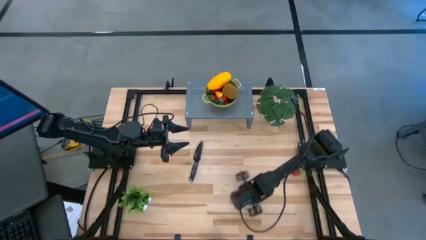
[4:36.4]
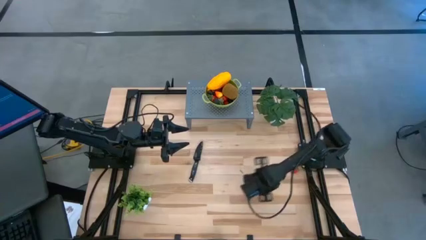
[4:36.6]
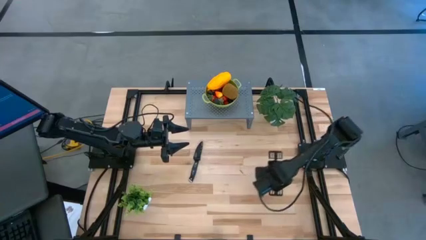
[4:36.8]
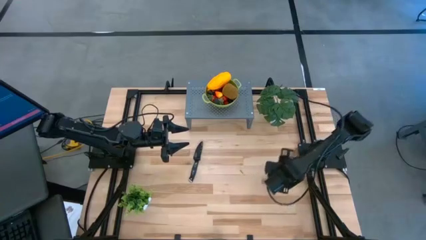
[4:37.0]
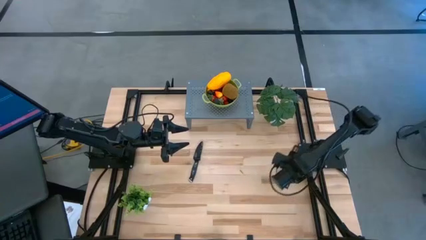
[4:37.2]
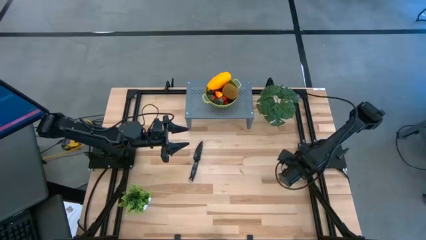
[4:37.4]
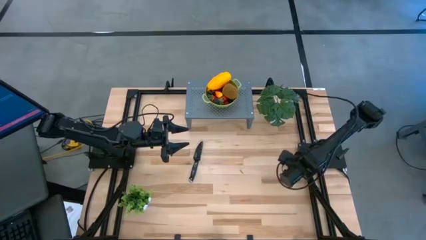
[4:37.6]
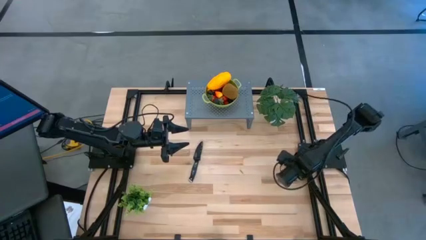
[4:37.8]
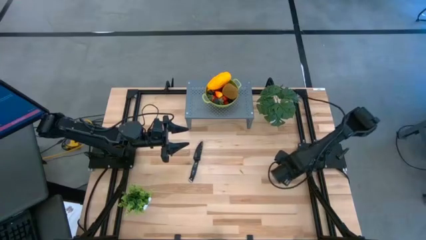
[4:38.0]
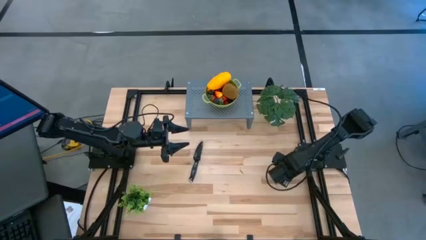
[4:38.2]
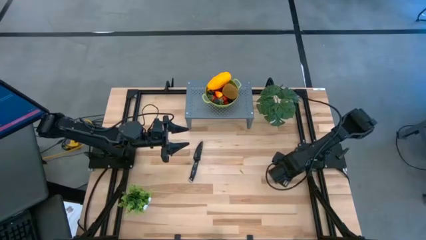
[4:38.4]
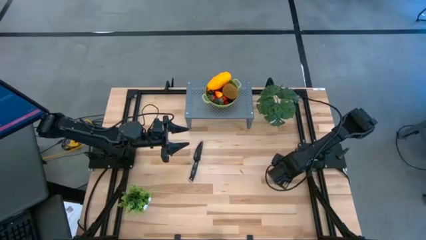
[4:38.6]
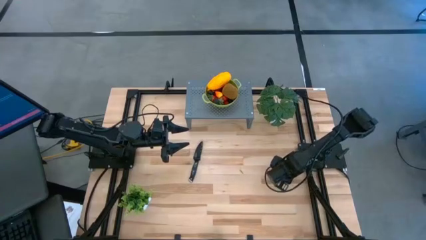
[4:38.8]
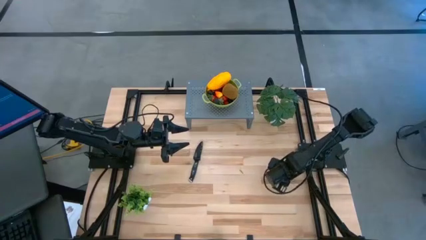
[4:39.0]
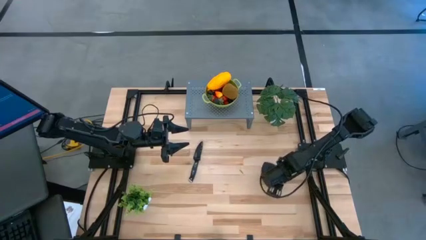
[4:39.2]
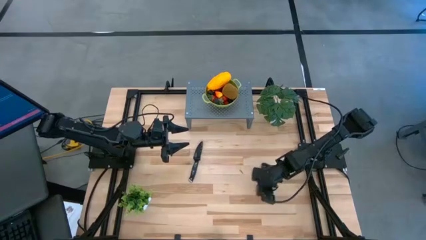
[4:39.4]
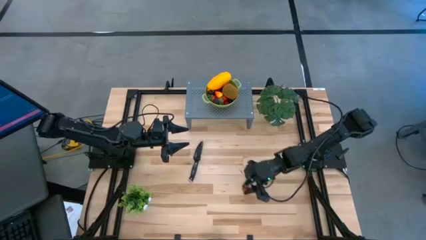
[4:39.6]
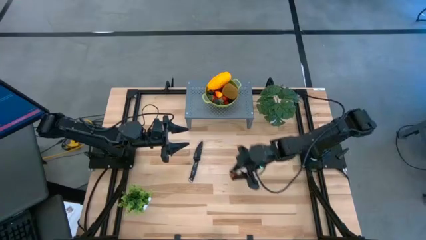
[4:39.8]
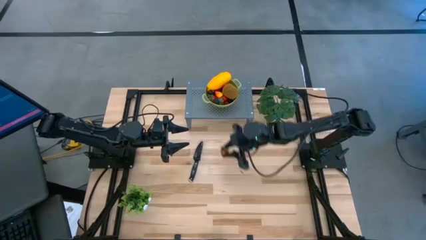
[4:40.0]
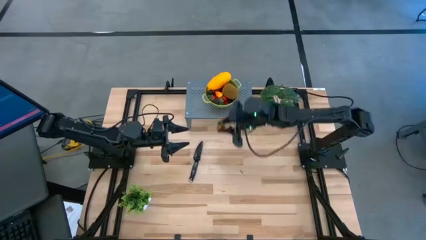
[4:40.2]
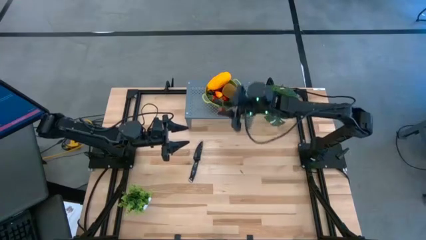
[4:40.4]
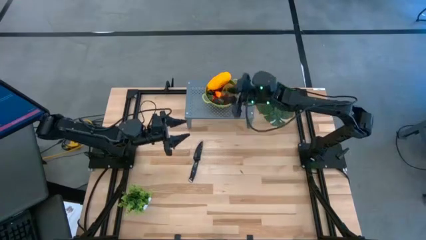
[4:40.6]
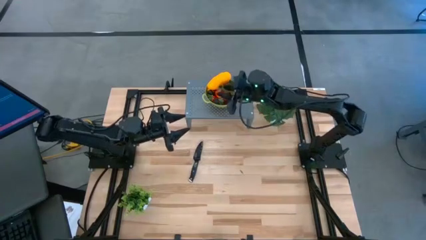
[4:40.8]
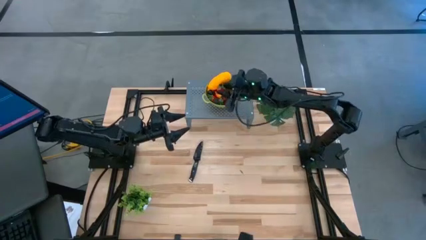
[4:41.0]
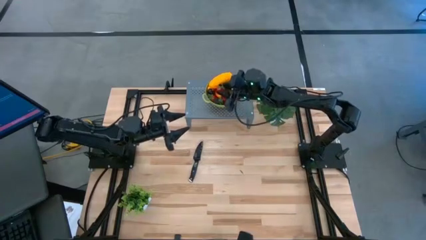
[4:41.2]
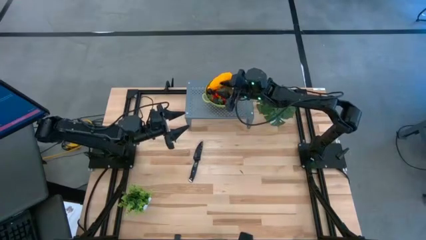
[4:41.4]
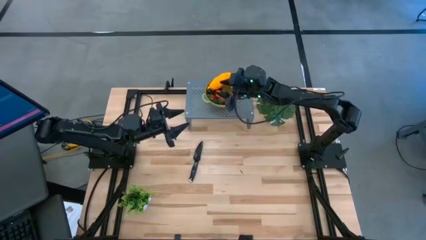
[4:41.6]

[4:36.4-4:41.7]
Task: Pick & Place Fruit
Put the strawberry into the green strainer bowl on the shelf

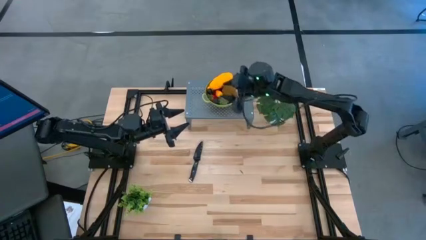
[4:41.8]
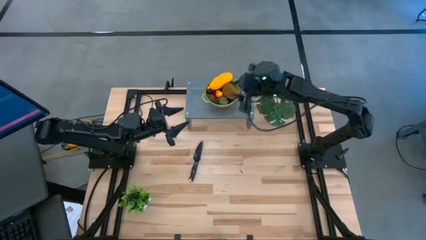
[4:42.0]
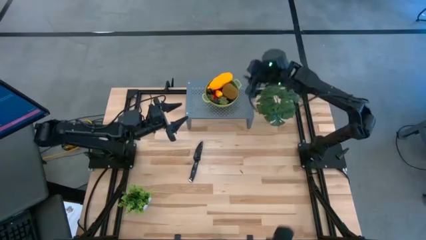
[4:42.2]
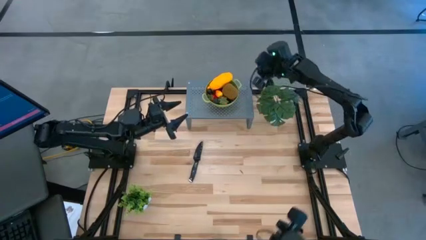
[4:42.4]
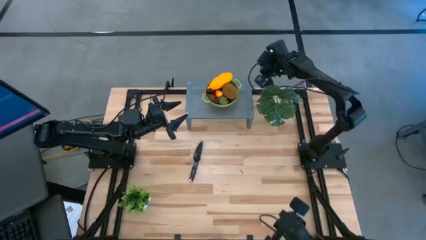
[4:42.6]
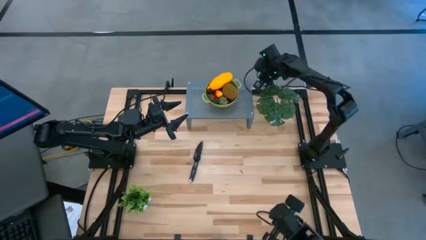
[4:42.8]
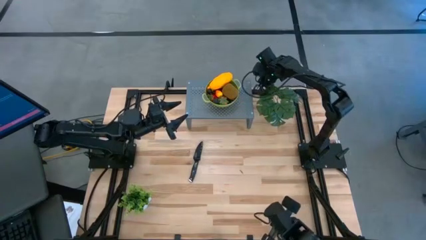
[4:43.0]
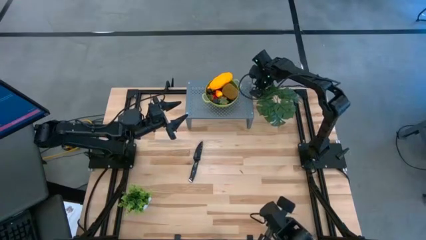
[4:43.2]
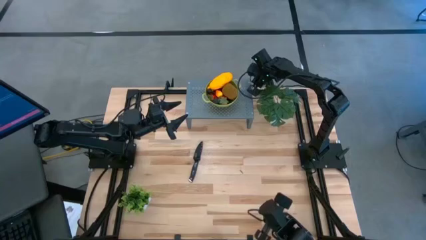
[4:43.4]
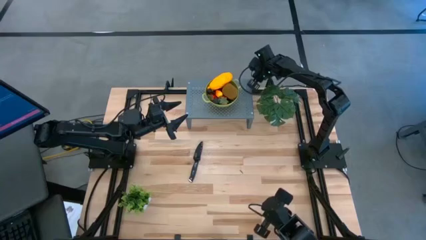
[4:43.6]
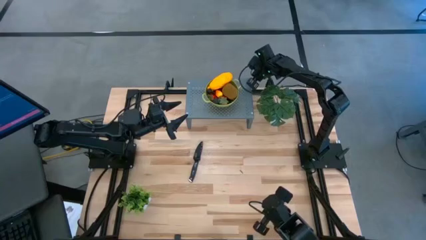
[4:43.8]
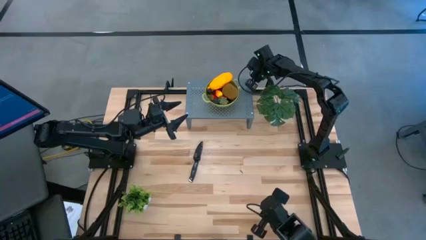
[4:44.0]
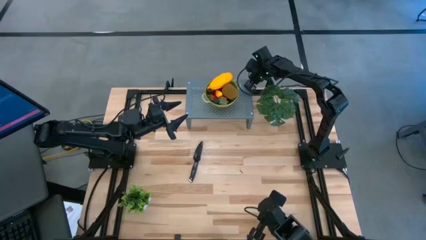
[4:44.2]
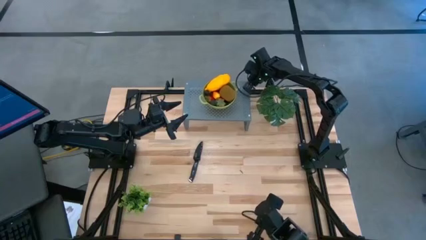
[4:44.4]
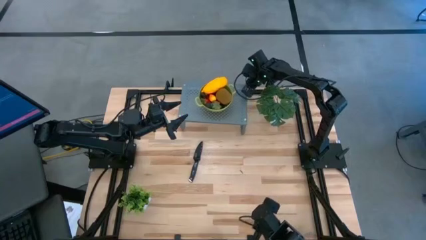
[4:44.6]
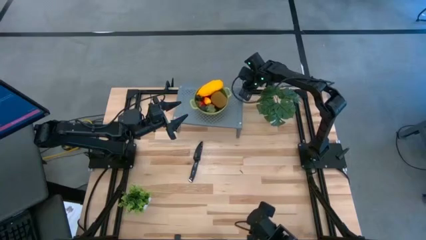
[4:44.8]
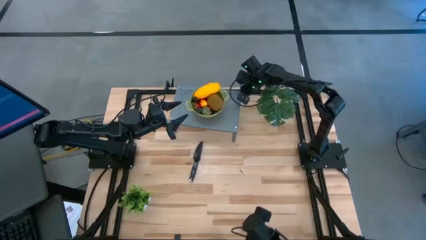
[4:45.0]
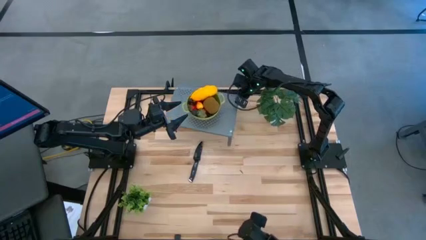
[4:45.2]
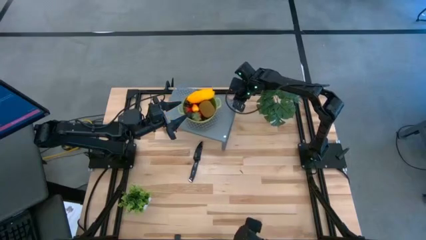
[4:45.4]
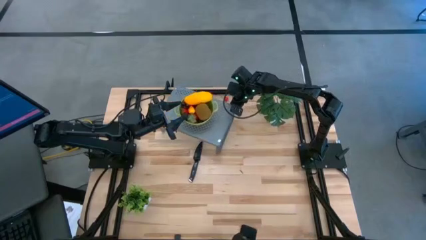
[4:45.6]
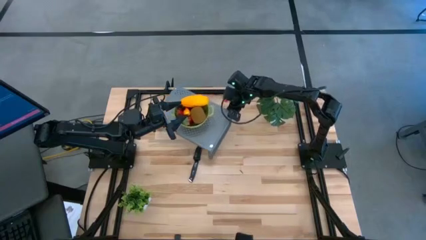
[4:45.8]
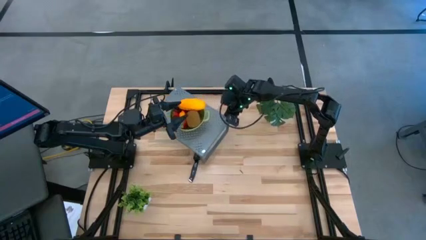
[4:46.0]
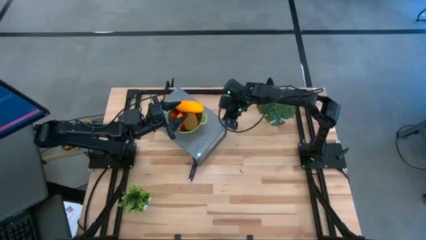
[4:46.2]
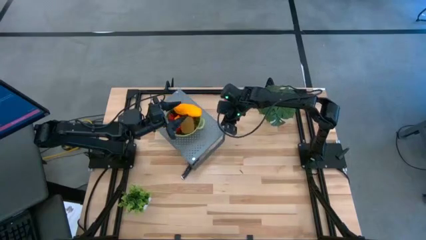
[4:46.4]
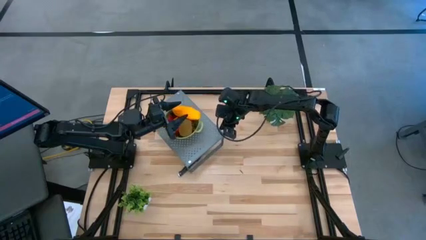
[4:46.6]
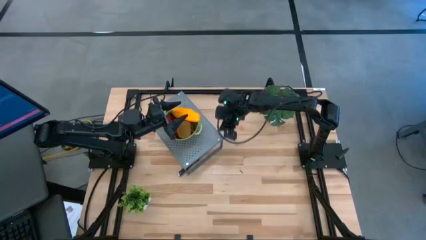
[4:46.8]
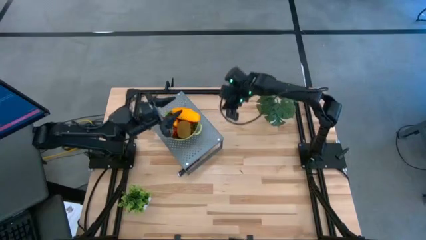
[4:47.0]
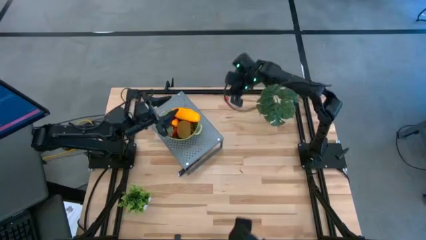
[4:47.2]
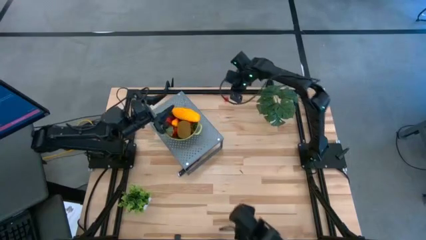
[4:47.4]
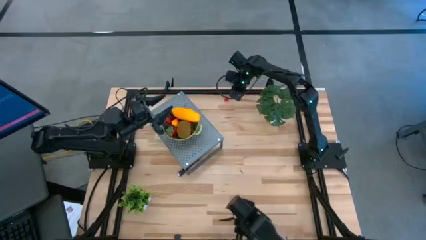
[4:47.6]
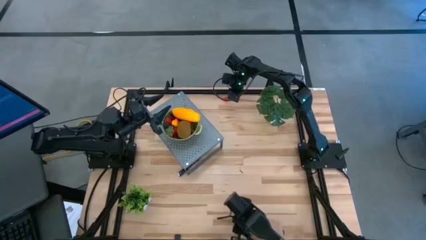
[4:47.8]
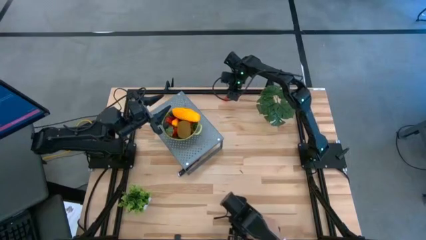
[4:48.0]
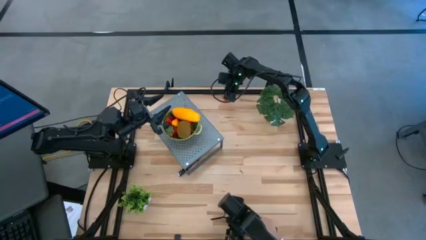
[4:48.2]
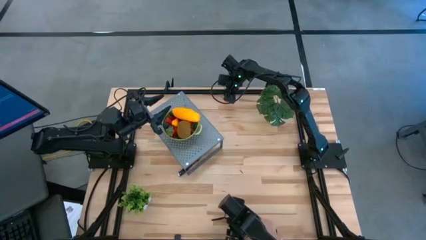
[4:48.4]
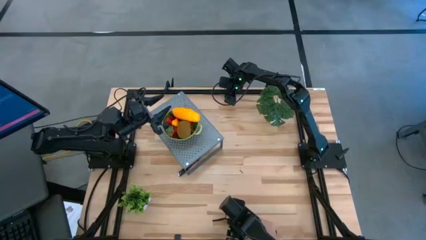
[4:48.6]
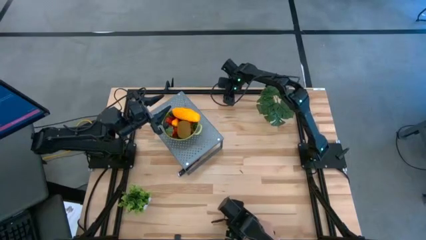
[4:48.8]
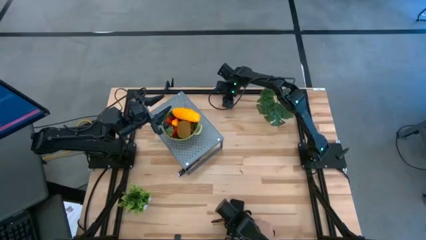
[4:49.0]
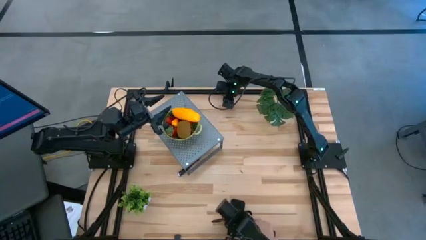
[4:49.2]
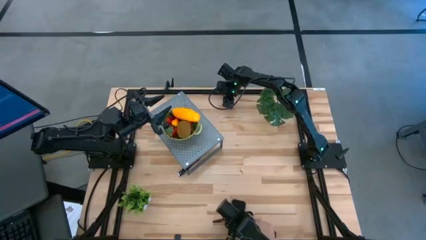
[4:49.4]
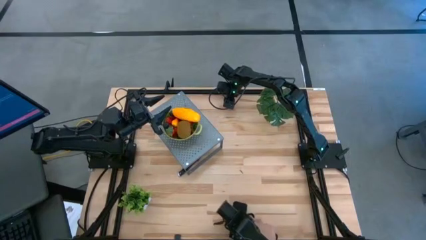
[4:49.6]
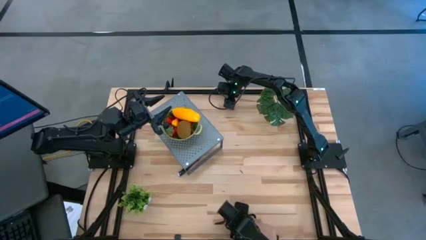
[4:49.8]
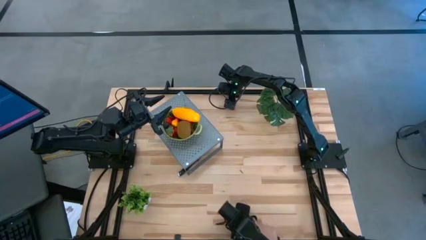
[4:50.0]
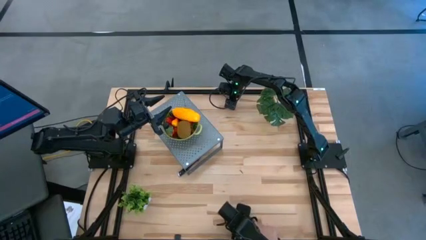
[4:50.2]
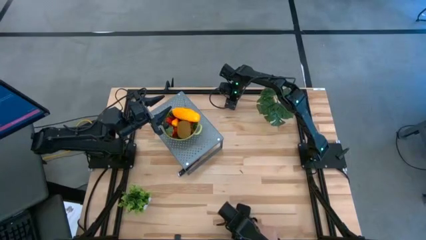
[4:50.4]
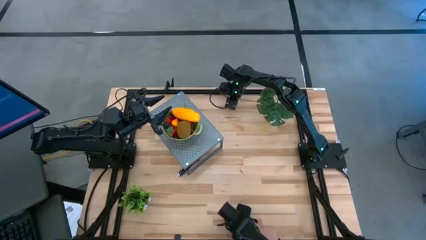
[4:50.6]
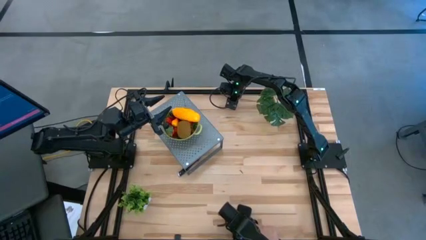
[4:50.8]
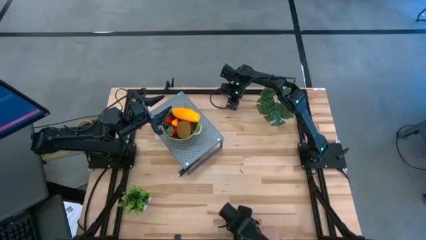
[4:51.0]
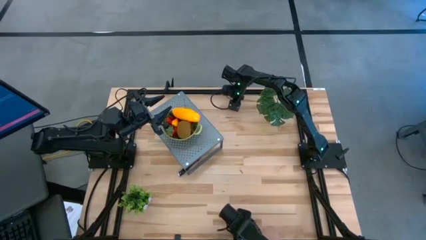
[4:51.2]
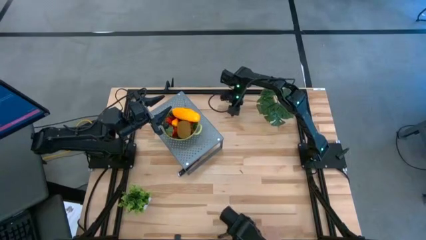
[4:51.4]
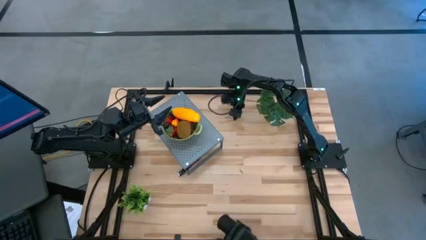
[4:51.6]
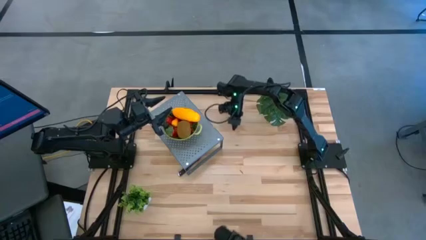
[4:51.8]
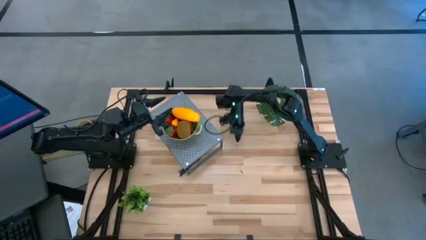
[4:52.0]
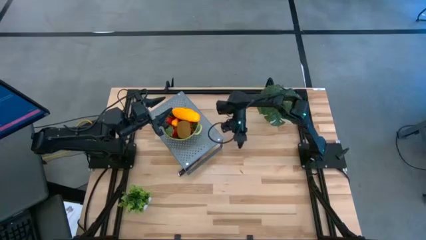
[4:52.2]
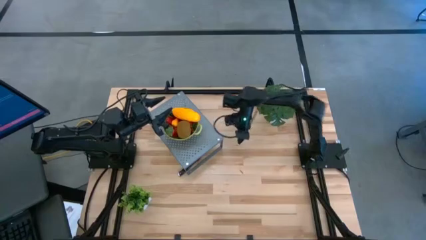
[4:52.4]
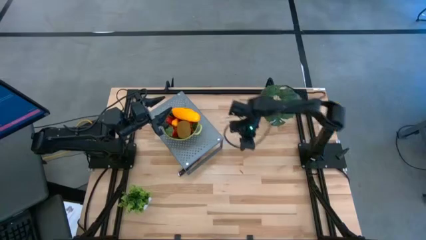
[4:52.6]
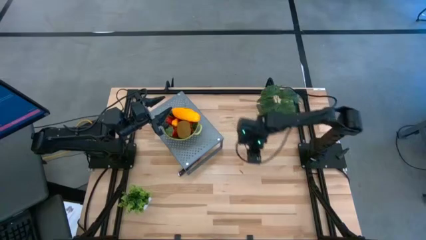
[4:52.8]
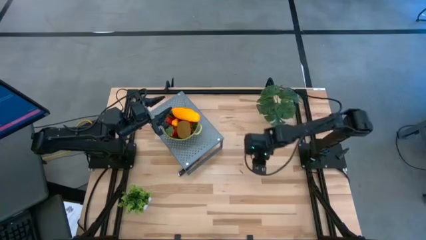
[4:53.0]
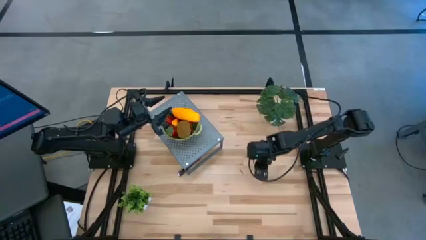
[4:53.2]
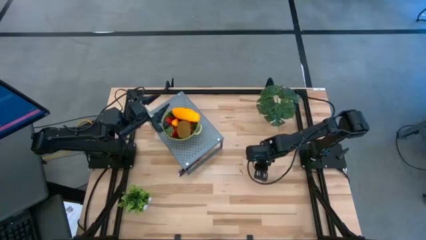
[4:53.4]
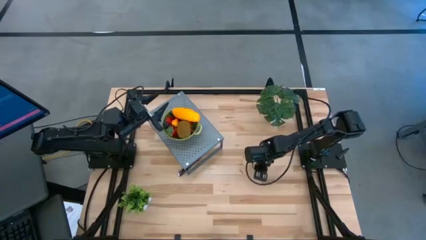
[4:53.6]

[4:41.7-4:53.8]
Put the red cherry into the green strainer bowl on the shelf
